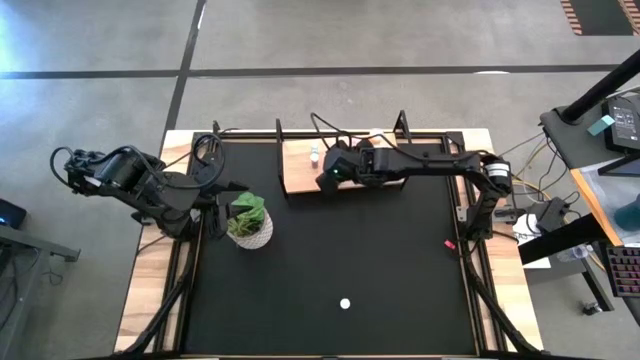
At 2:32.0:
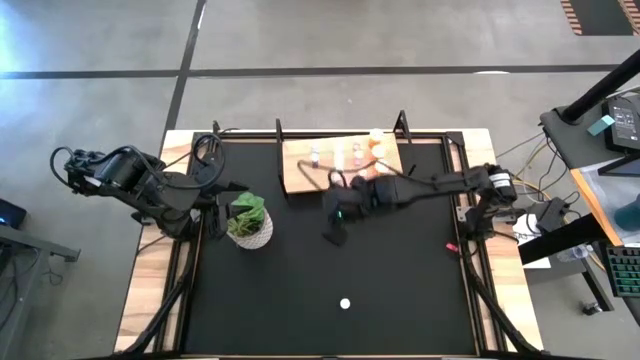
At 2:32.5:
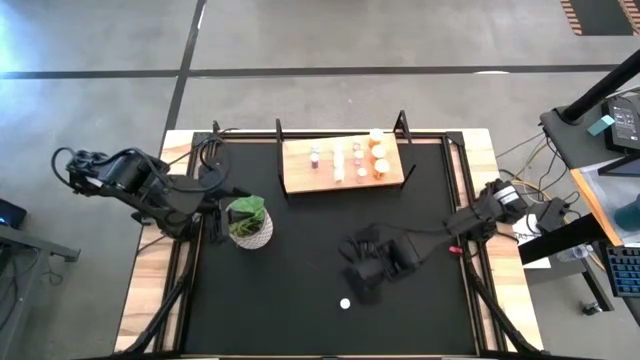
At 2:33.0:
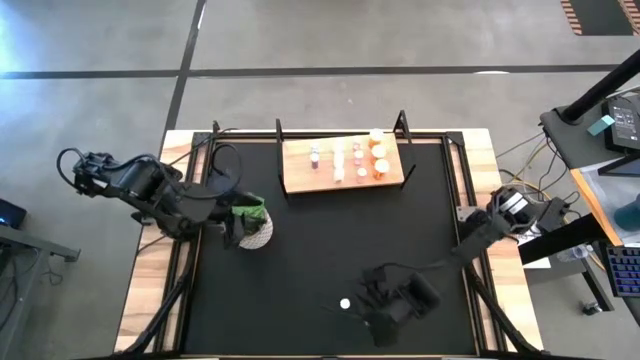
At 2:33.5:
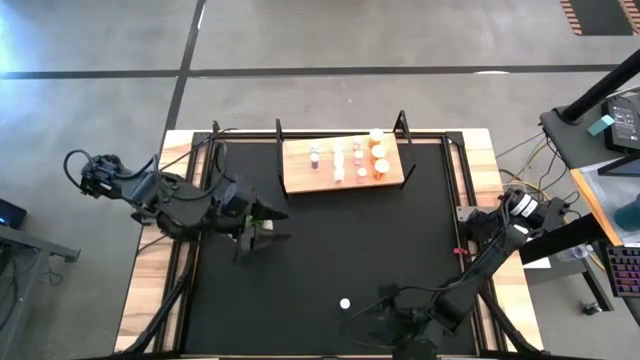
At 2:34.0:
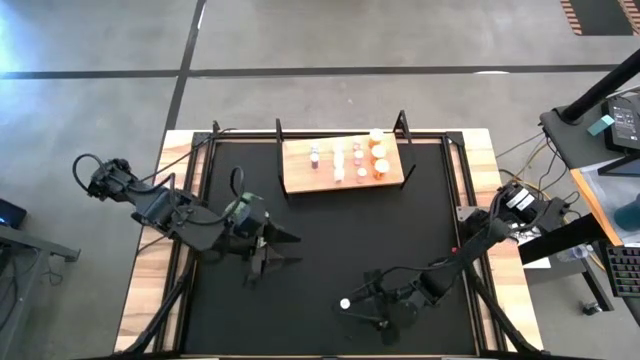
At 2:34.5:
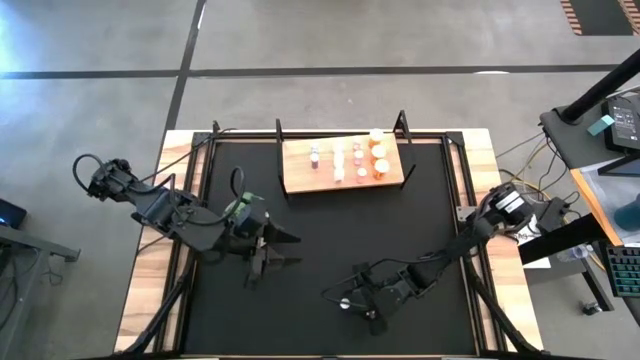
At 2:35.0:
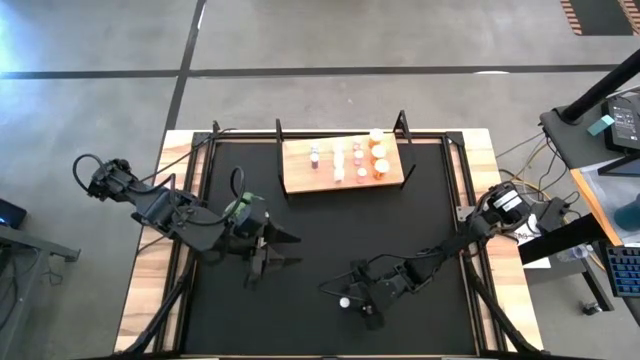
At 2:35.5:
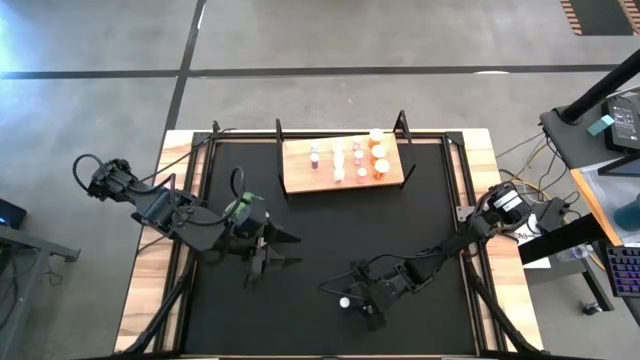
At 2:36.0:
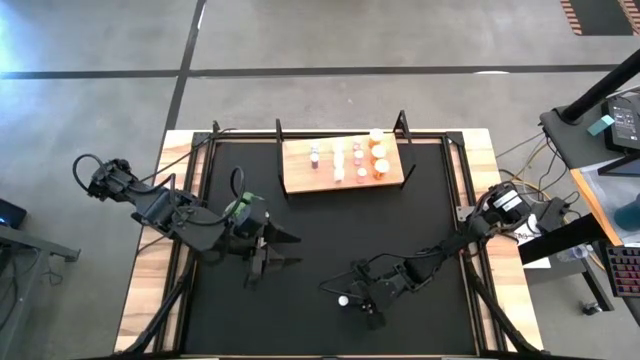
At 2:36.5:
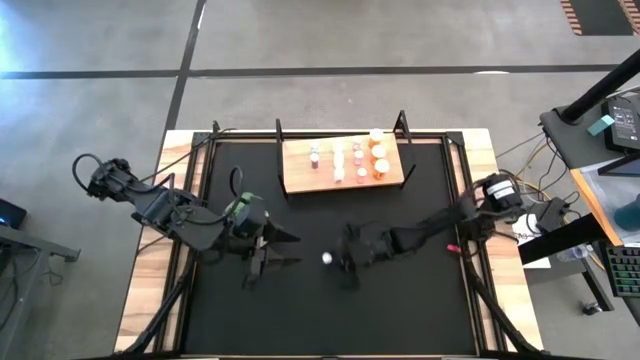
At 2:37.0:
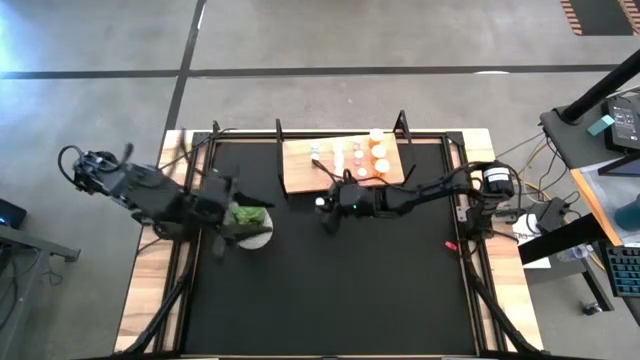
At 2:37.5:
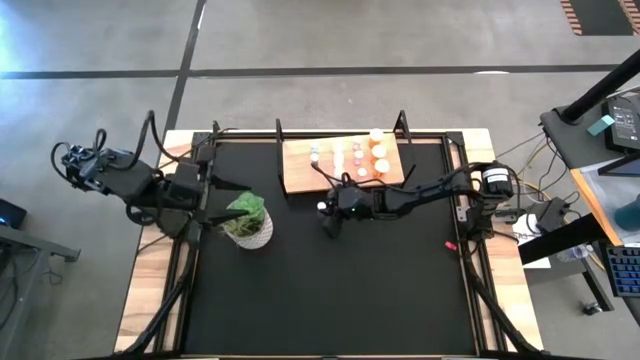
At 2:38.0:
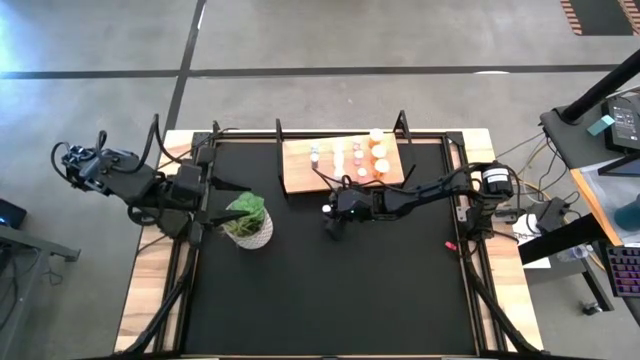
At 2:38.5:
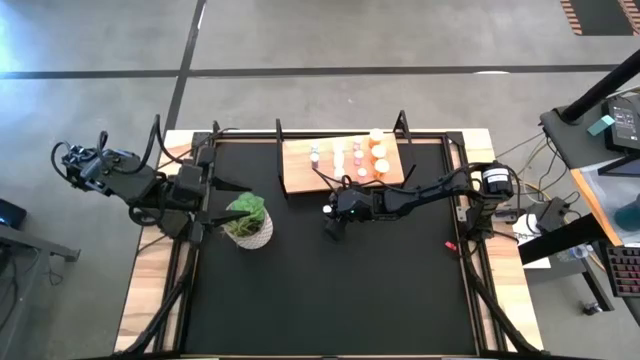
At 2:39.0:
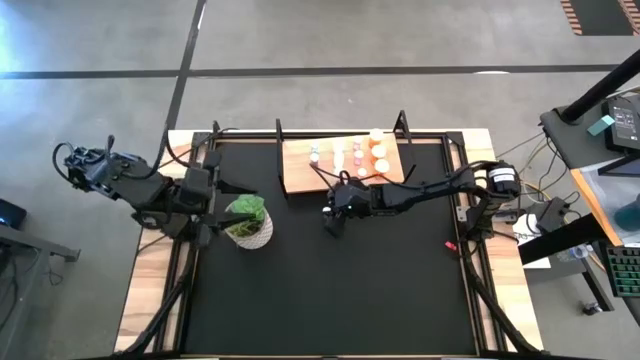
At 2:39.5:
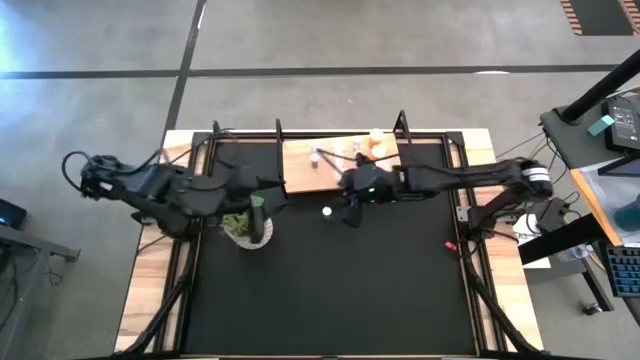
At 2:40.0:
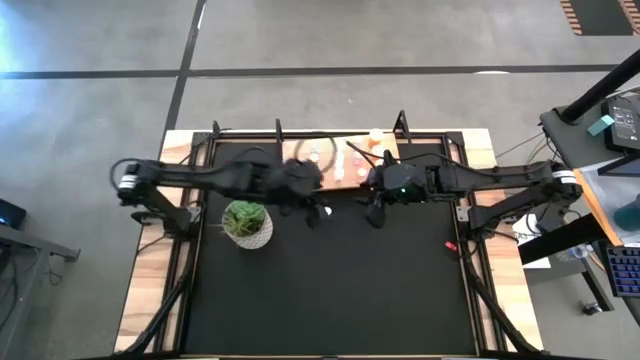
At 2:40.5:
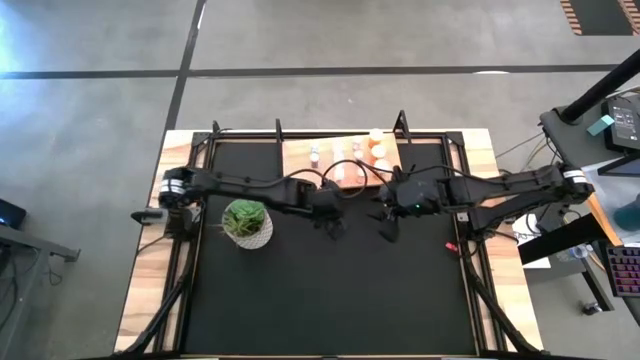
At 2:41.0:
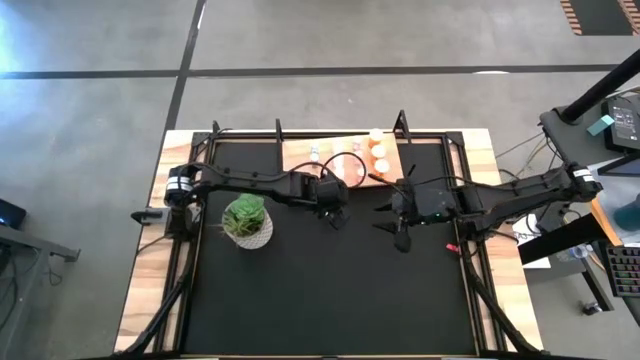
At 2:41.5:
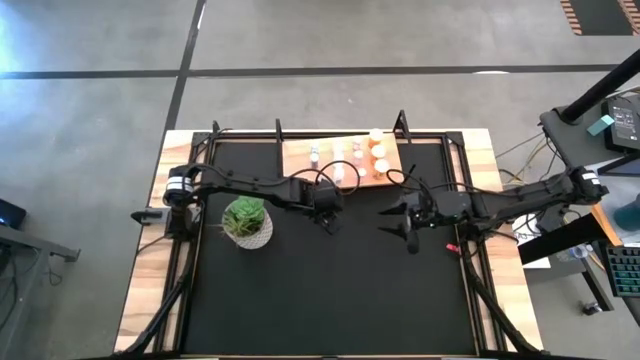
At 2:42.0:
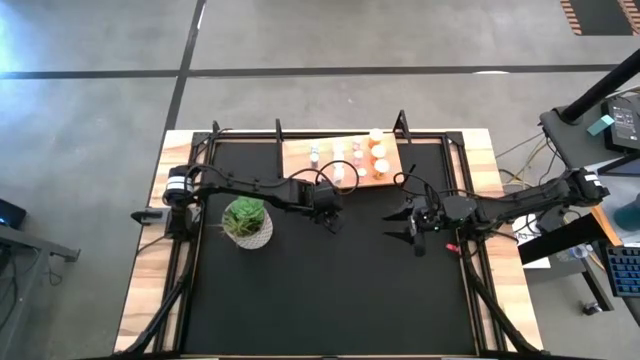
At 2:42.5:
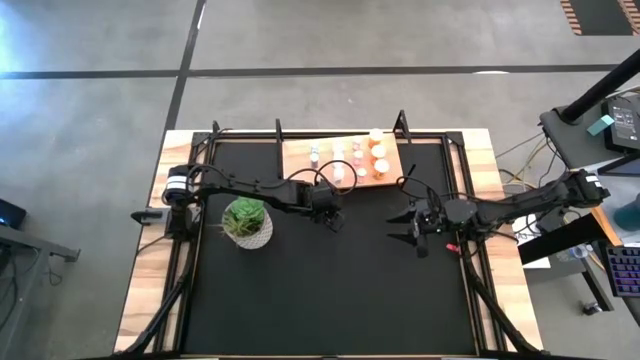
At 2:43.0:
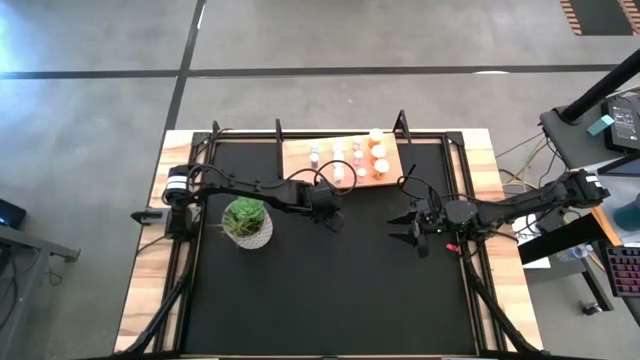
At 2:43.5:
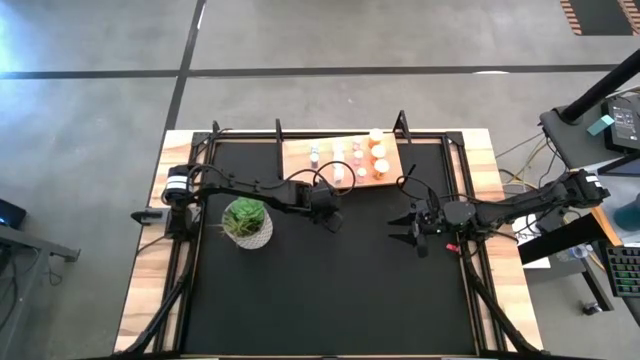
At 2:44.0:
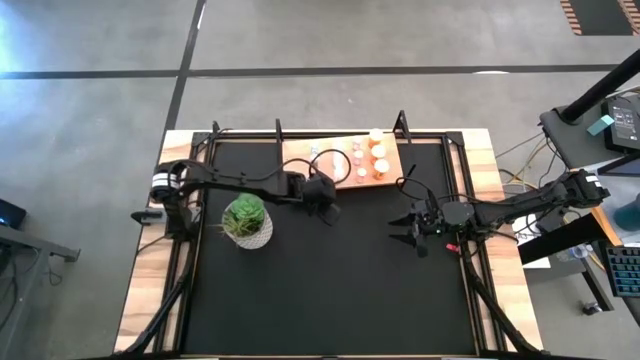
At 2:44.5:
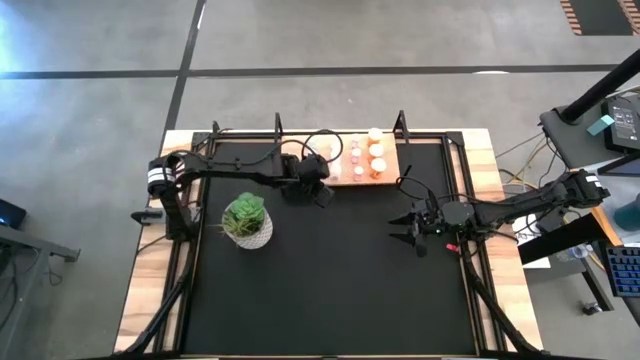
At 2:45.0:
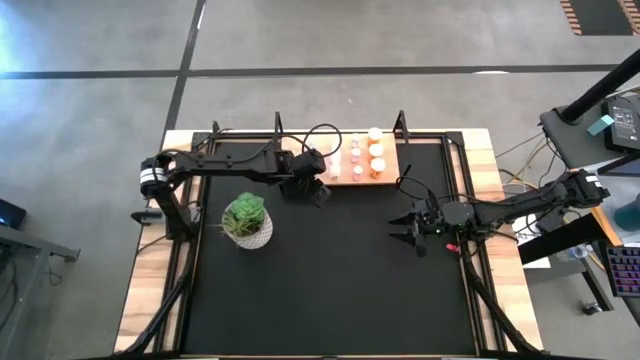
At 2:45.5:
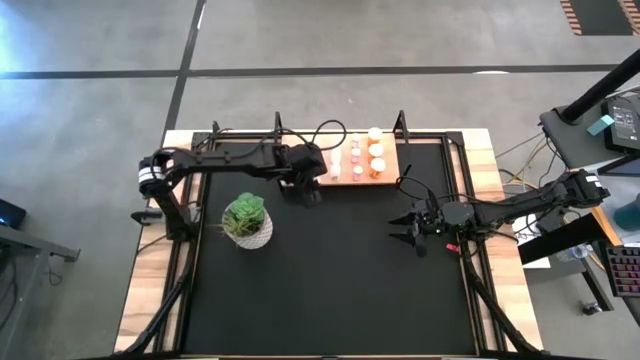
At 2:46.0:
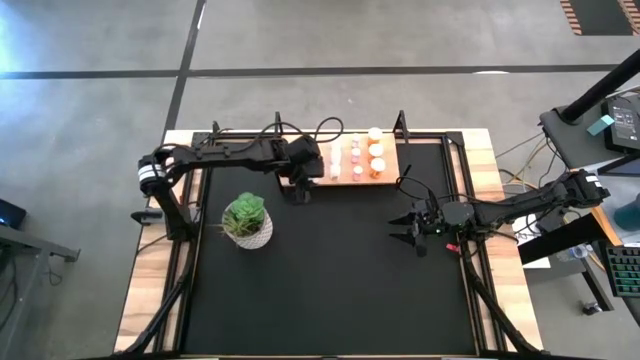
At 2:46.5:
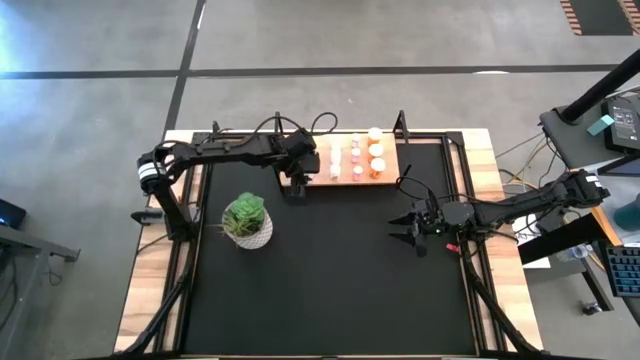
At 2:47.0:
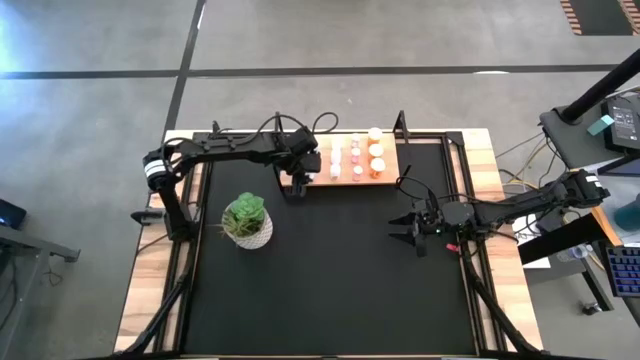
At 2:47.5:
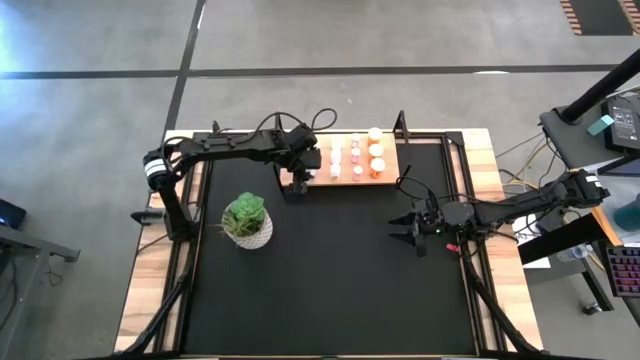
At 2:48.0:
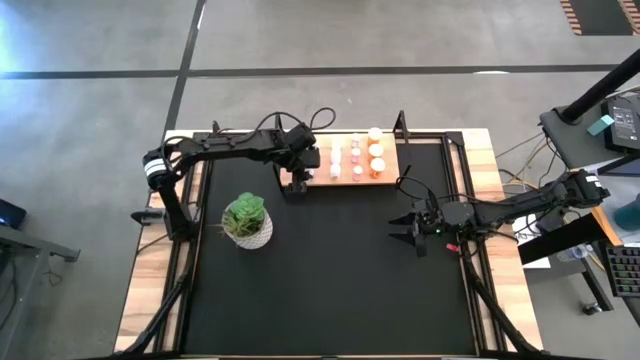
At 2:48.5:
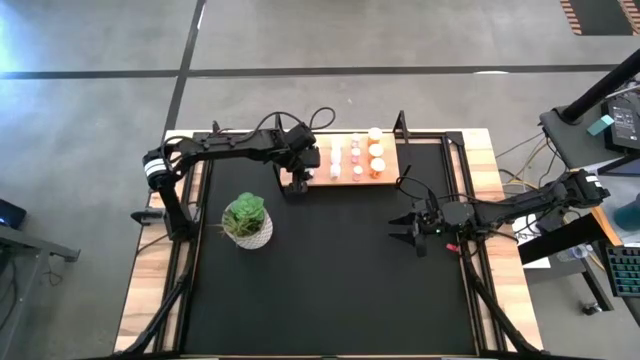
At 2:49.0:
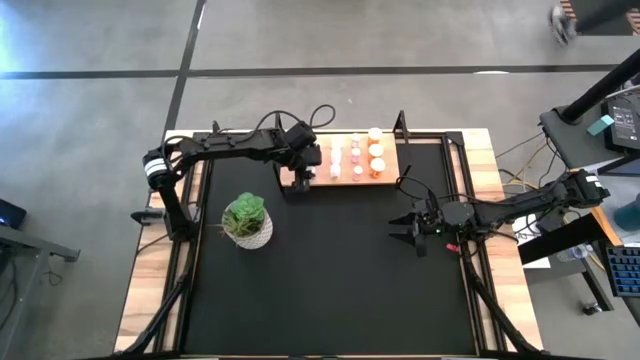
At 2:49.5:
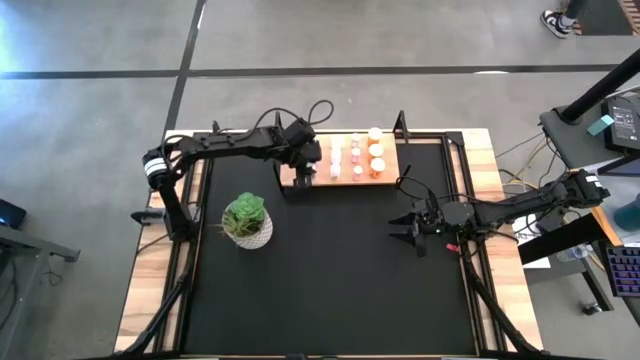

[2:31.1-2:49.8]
Task: Pick and place medicine bottles onto shelf by color
Put the blue pill bottle on the shelf aligned with the other blue pill bottles

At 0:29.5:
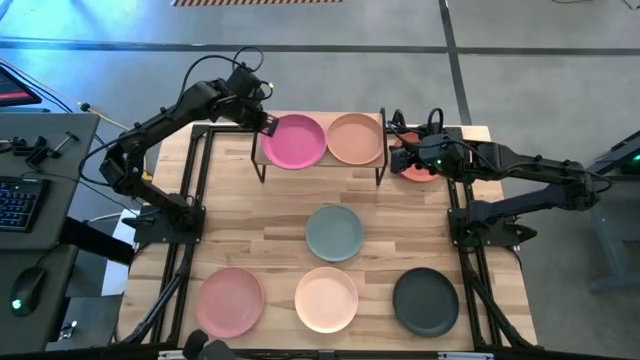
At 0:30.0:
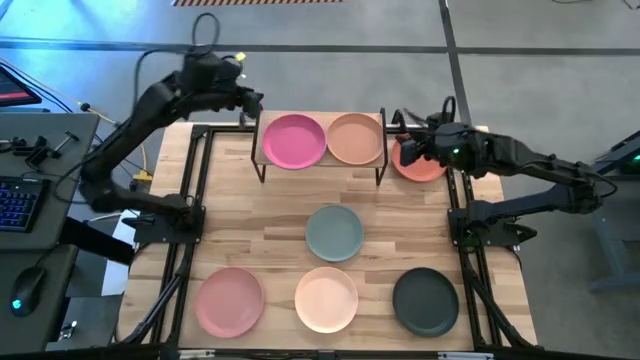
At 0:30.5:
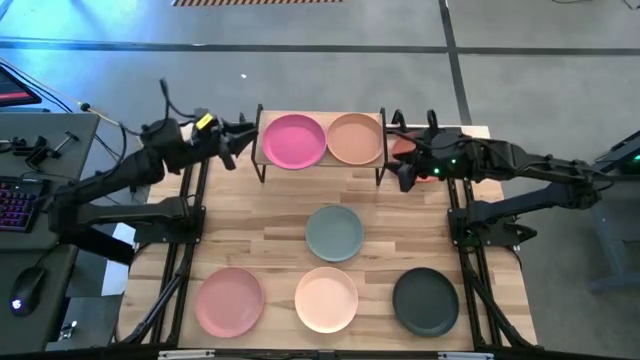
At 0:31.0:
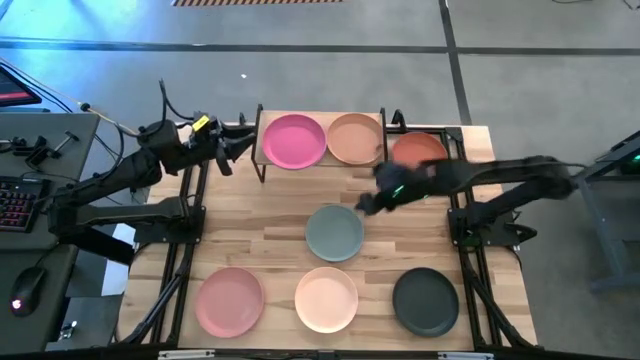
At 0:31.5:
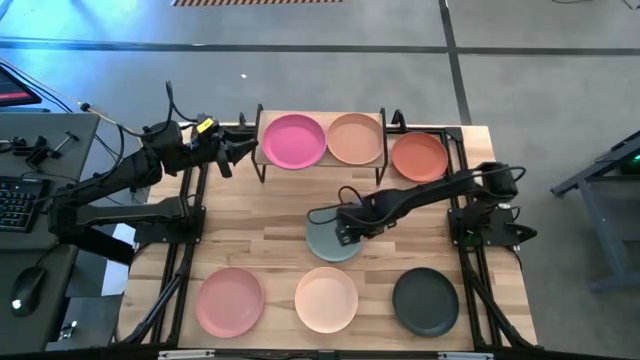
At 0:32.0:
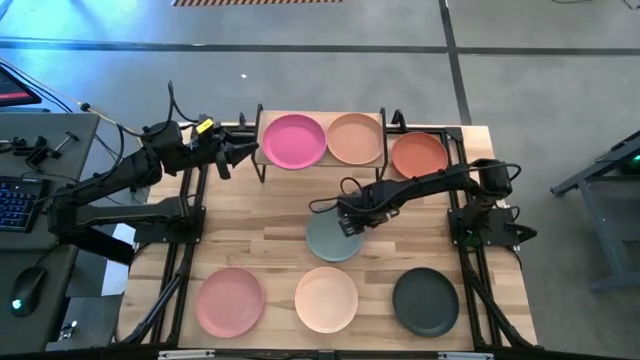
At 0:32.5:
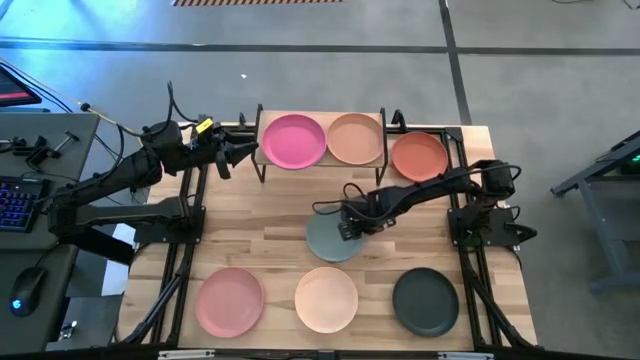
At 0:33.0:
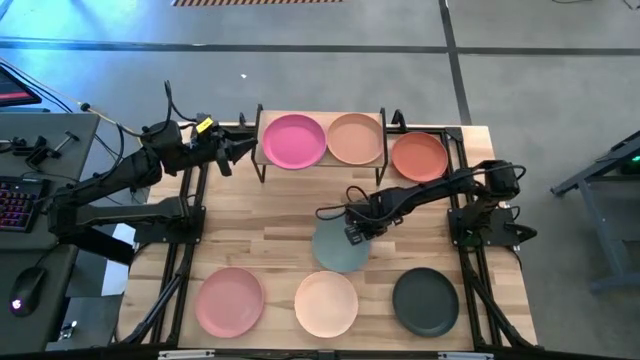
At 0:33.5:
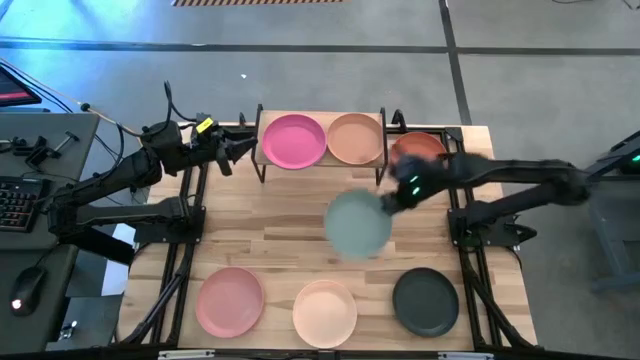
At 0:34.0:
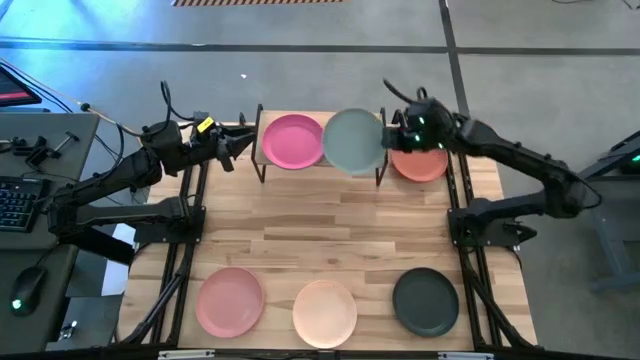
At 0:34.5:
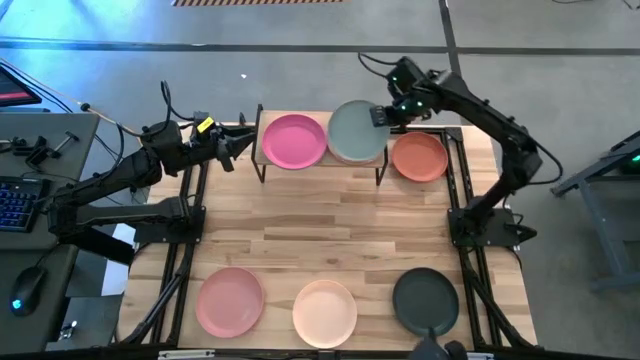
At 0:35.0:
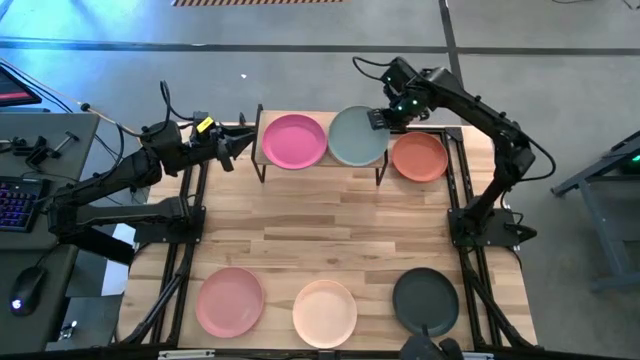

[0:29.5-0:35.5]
Task: Place and stack plates onto a shelf
Stack the gray plate on top of the brown plate on the shelf
